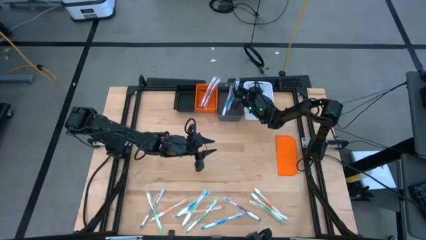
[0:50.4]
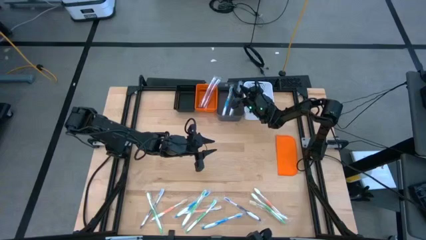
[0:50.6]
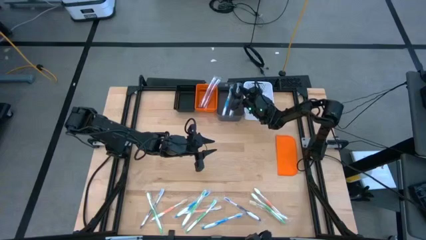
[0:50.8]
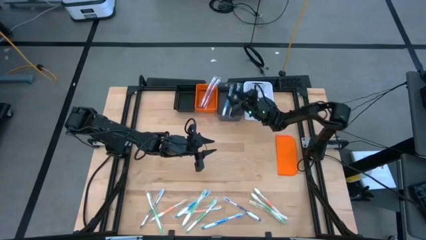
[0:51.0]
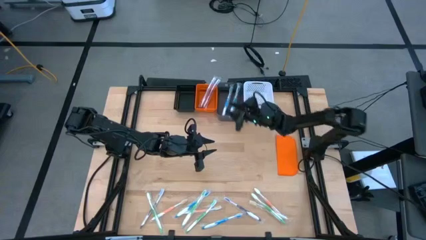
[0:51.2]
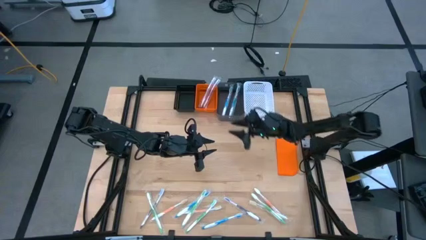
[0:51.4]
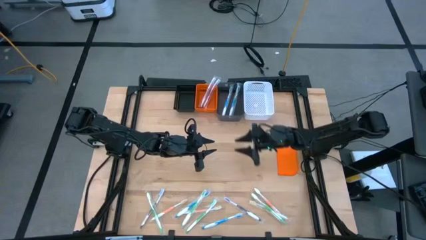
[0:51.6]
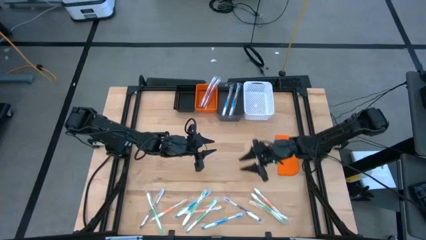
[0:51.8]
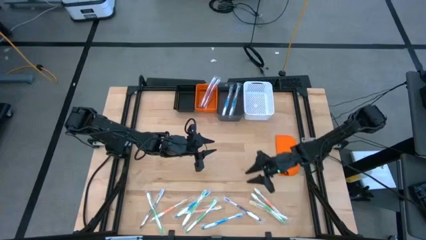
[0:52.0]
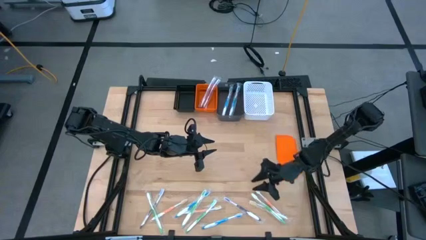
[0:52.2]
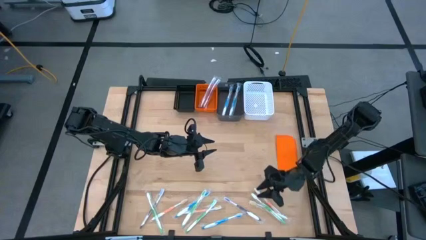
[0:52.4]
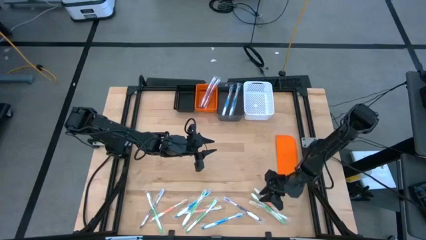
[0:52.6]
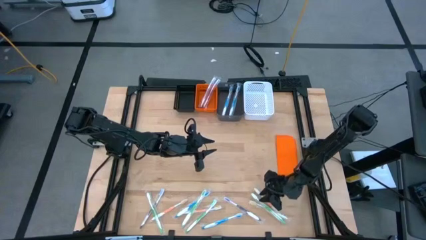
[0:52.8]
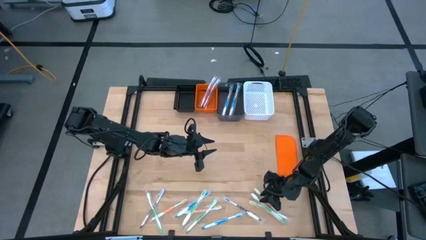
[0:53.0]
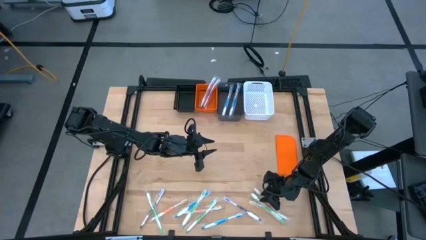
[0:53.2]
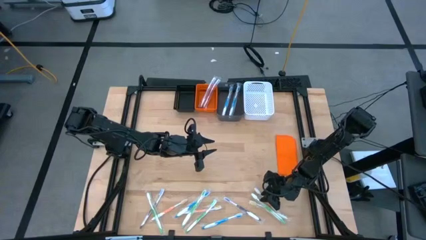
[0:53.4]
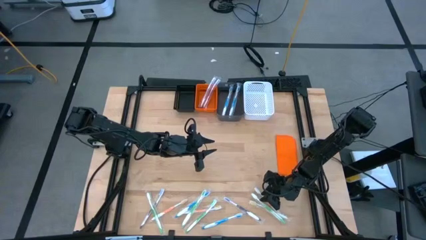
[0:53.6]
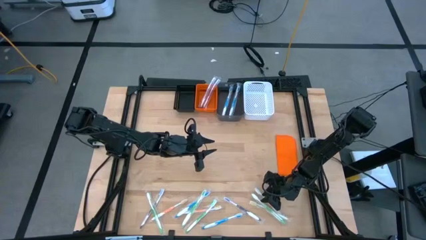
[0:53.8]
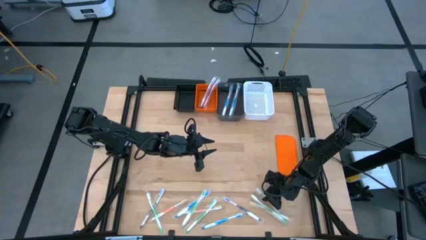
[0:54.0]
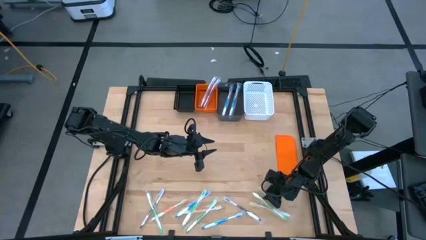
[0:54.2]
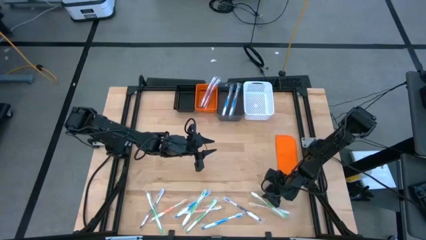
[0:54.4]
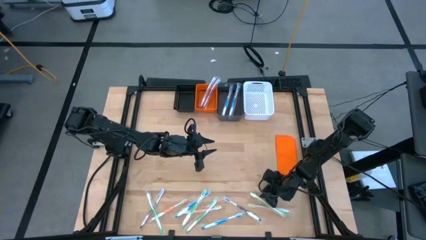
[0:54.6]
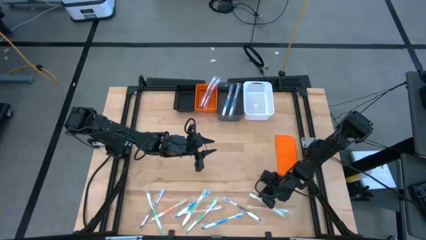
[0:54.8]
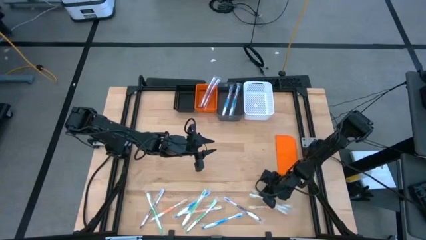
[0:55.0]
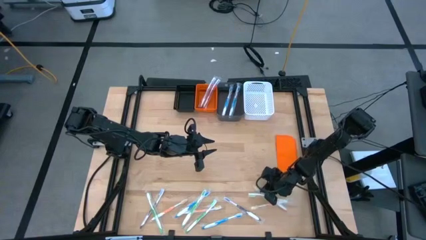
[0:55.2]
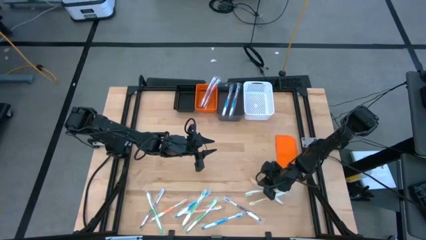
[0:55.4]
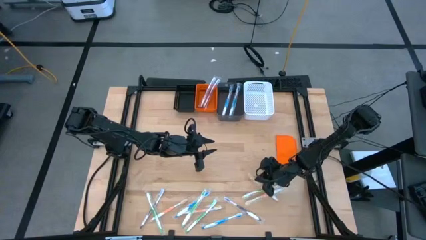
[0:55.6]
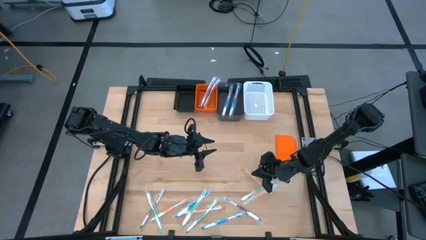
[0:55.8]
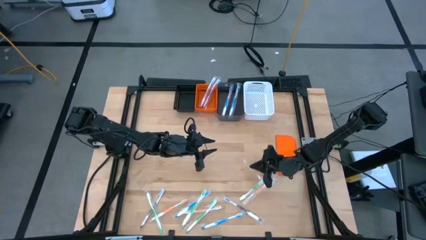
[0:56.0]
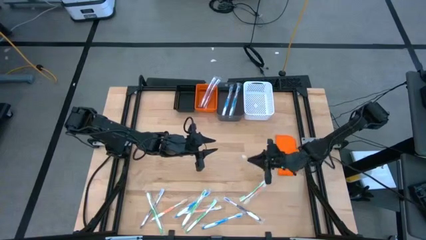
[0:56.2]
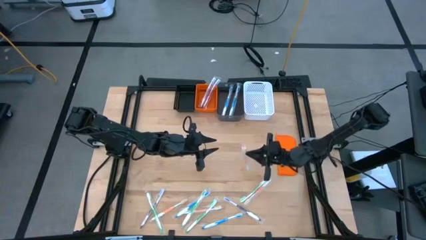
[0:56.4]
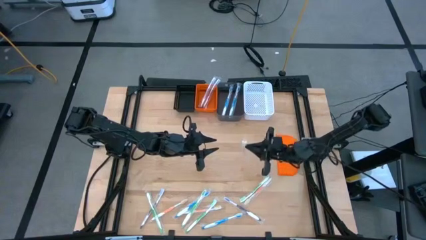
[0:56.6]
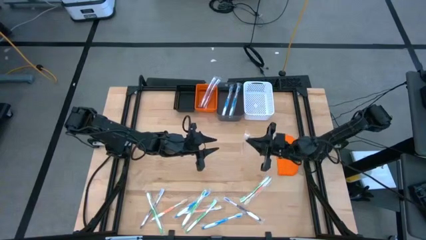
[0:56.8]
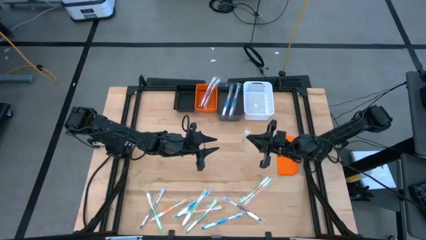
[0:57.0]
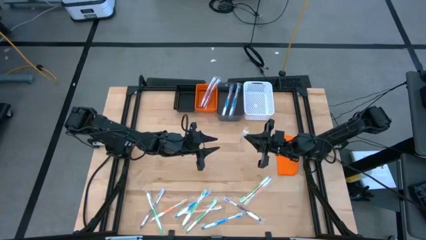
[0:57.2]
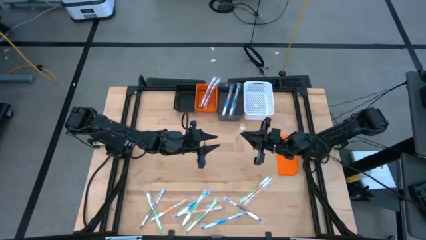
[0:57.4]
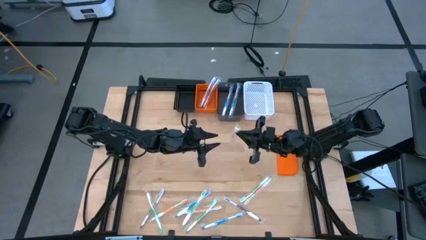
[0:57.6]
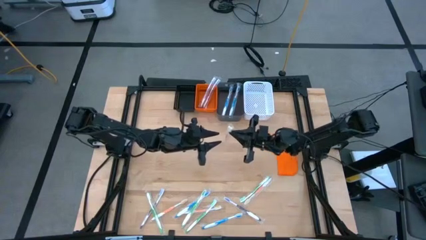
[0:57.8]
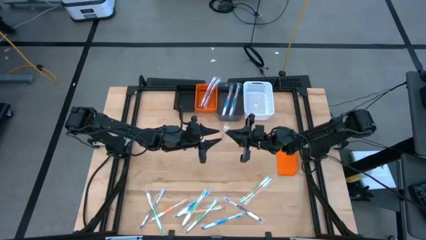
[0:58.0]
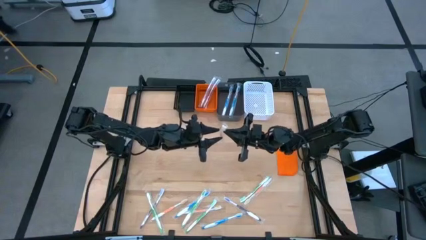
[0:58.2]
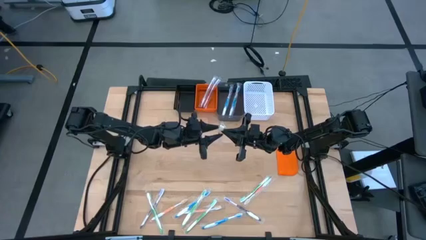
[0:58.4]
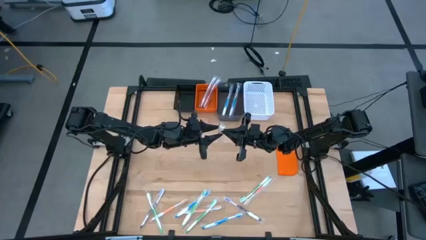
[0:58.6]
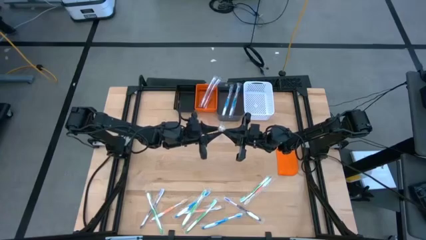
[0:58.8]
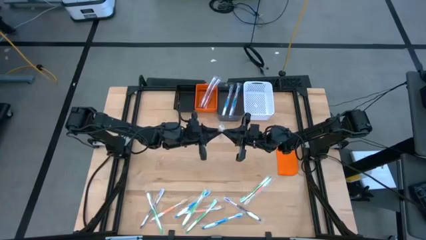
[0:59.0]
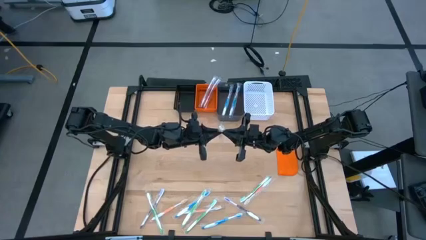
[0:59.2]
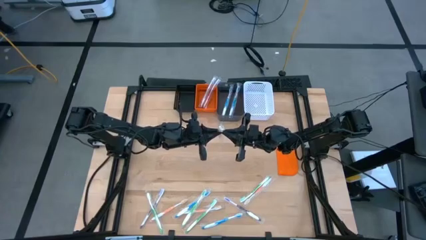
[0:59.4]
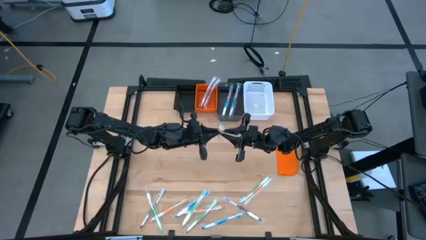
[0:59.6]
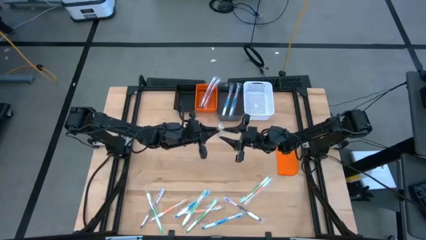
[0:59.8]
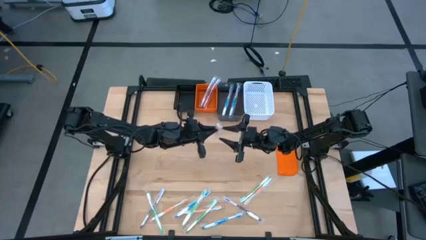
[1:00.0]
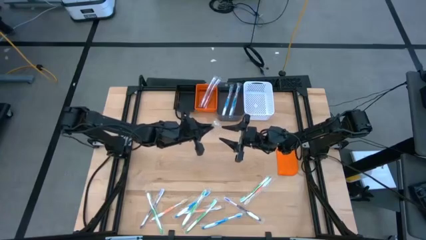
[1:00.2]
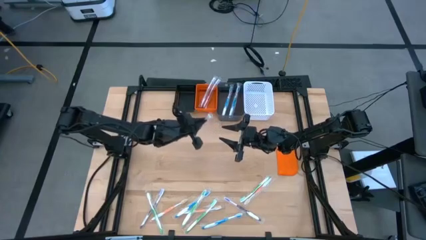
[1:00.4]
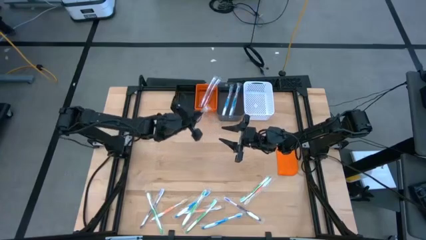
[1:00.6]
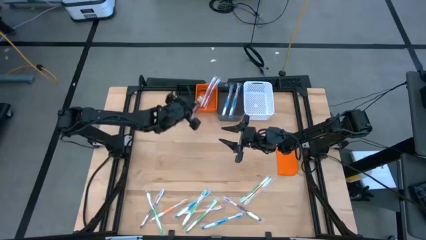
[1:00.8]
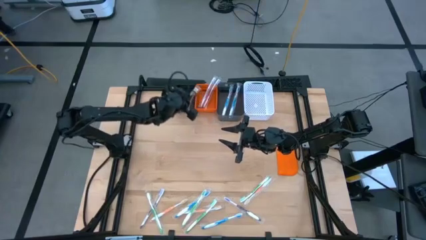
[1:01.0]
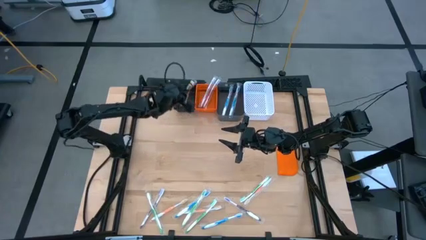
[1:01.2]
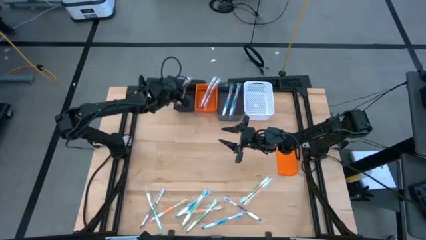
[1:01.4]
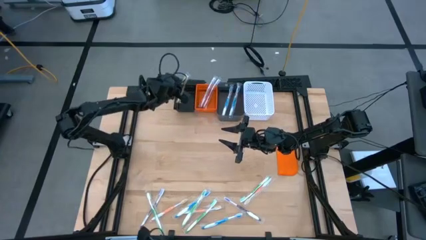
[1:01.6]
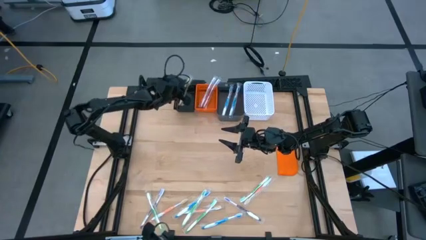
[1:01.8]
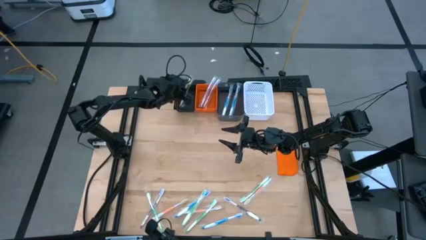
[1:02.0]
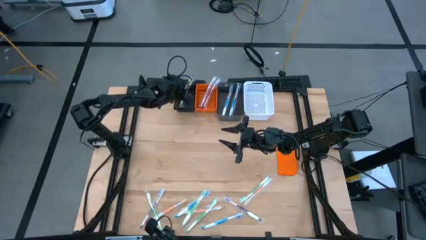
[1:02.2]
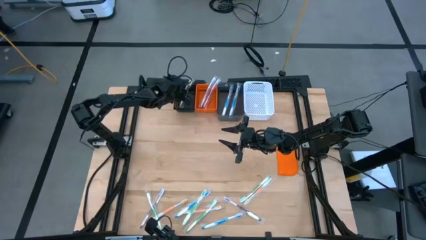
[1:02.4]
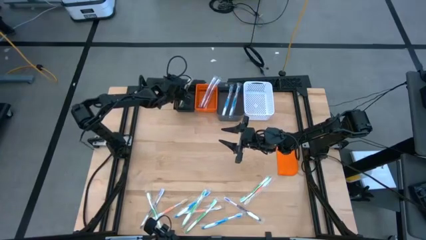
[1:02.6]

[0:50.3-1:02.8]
Task: Pick & Place Toothbrushes
Put the orange toothbrush into the black bin

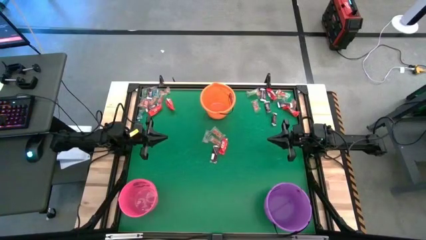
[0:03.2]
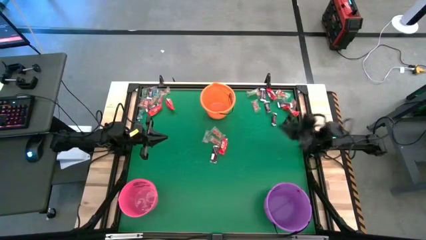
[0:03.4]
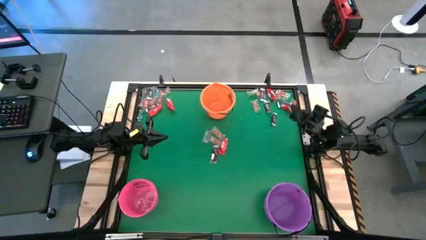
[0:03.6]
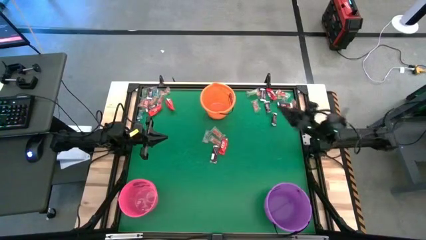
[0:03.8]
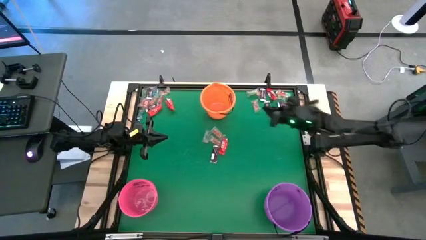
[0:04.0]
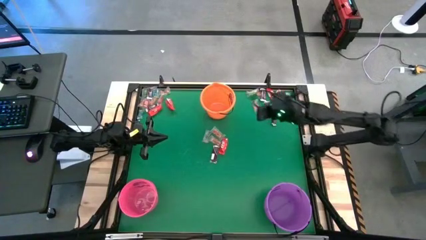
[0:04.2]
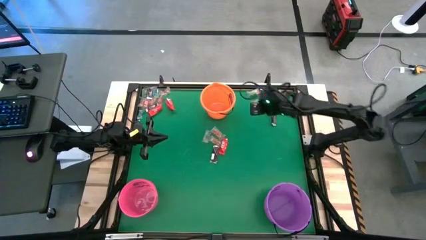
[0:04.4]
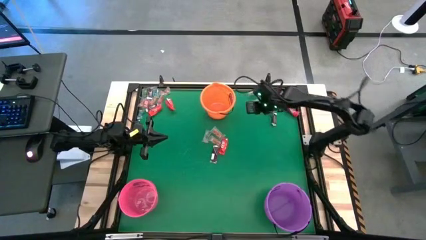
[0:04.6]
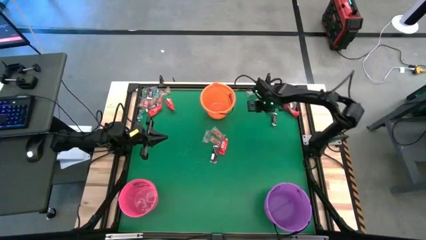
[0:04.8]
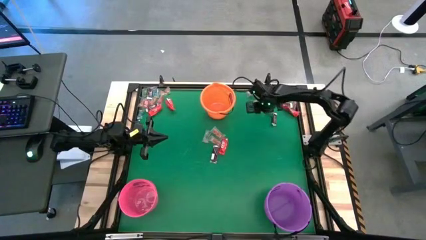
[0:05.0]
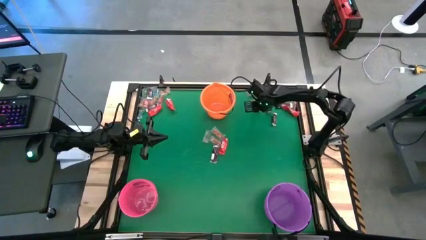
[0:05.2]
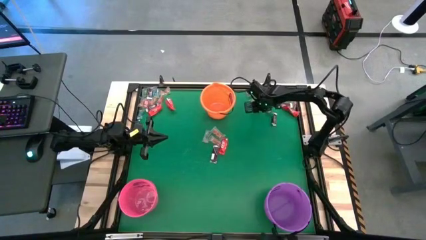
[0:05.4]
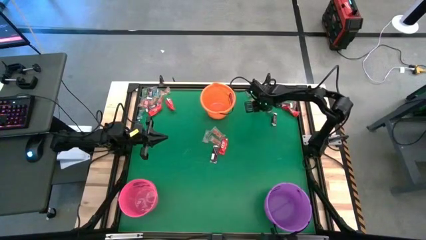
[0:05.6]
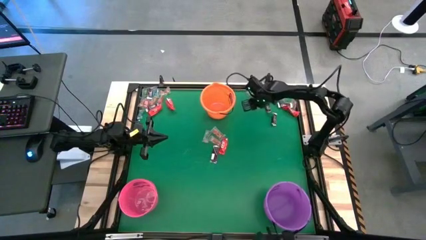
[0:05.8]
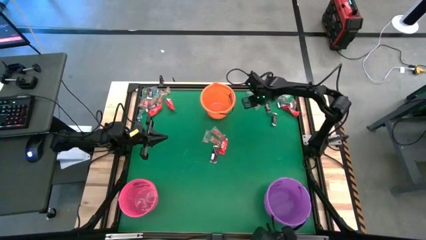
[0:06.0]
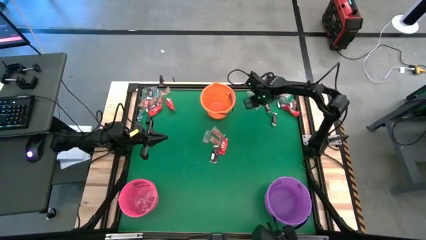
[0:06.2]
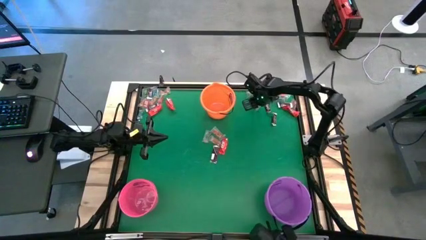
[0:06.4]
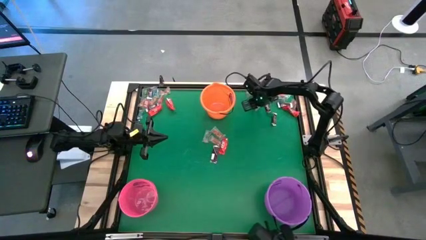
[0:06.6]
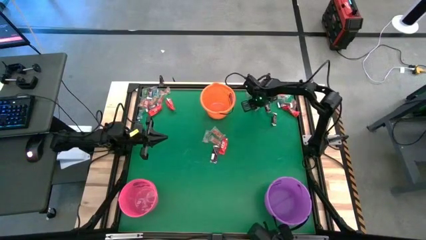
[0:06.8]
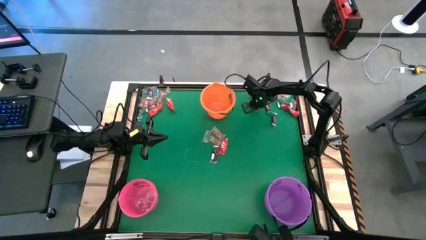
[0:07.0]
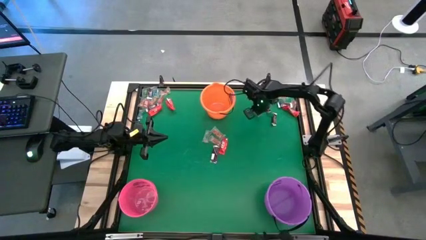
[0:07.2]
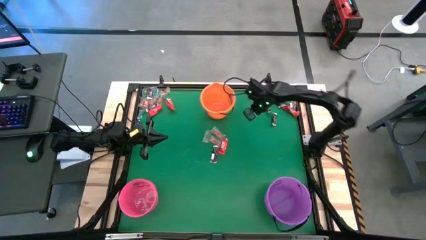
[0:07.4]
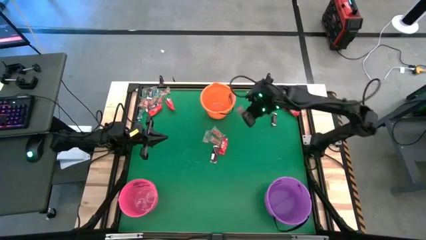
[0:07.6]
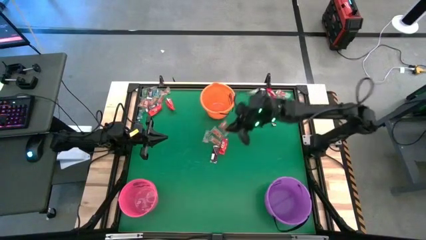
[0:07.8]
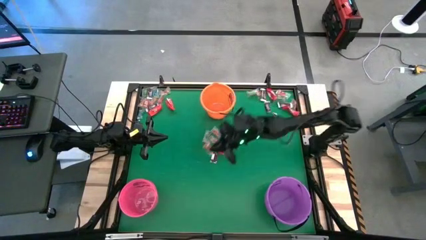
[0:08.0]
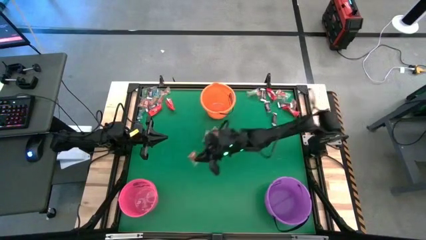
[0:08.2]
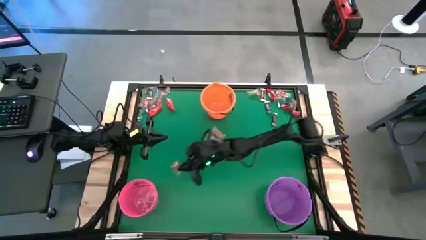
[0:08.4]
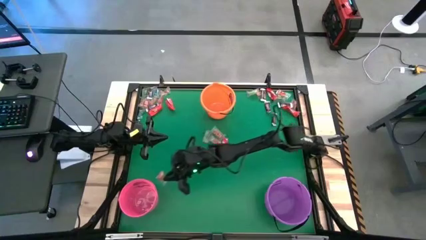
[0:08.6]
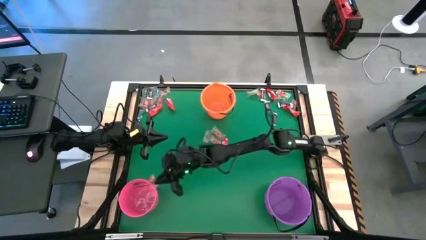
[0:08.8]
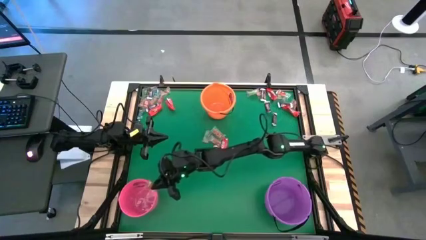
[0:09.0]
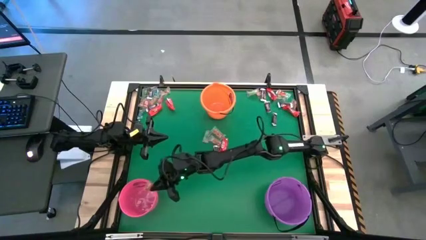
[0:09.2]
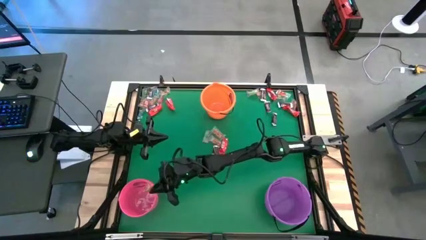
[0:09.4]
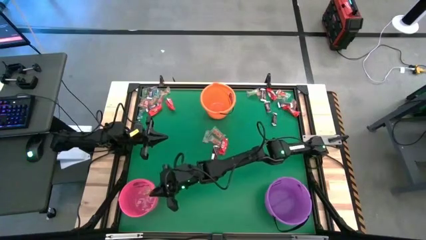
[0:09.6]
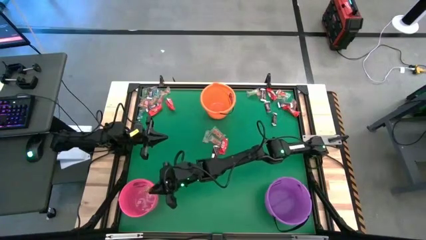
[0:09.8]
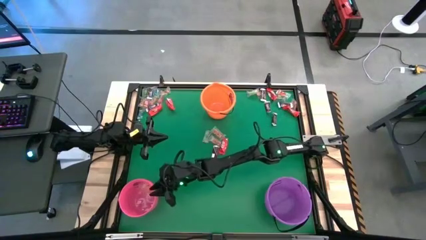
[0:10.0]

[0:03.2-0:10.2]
Task: Sort candy by brand, put in halloween buckets
Put the orange gummy into the pink bucket
